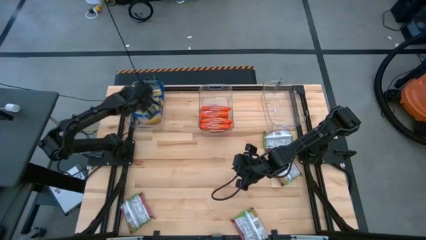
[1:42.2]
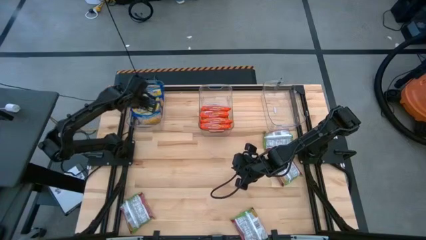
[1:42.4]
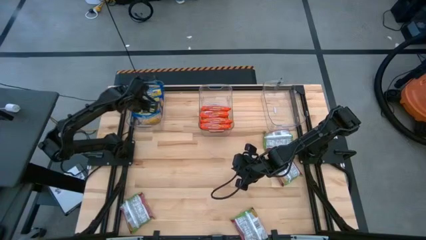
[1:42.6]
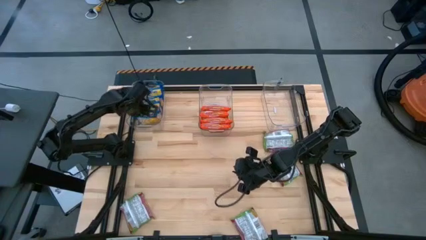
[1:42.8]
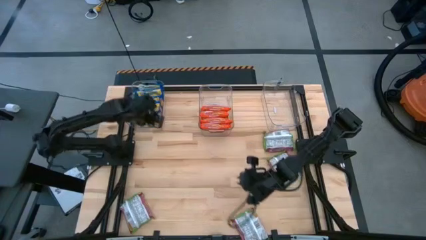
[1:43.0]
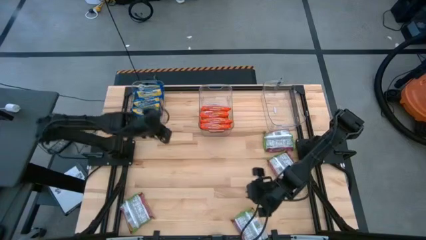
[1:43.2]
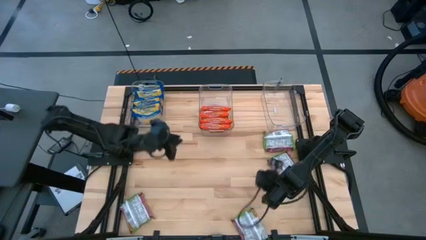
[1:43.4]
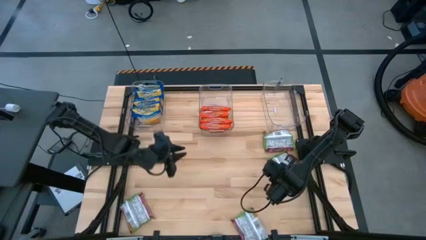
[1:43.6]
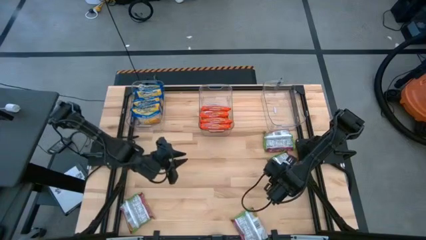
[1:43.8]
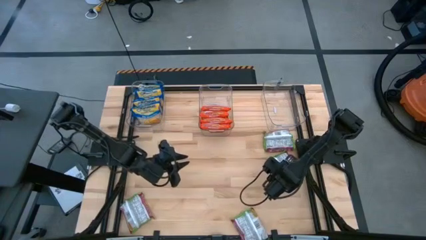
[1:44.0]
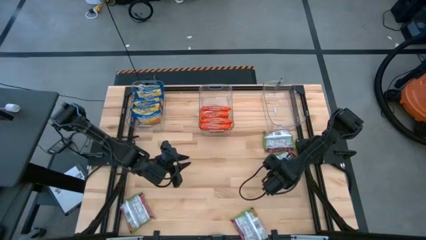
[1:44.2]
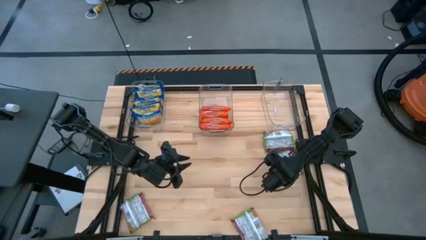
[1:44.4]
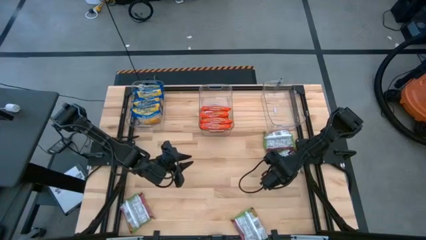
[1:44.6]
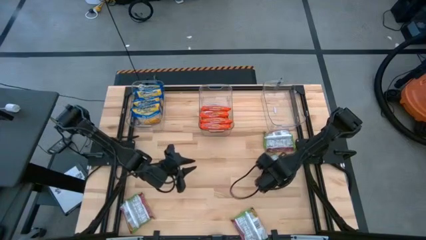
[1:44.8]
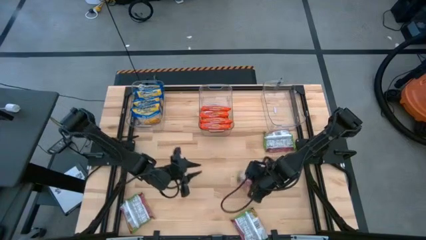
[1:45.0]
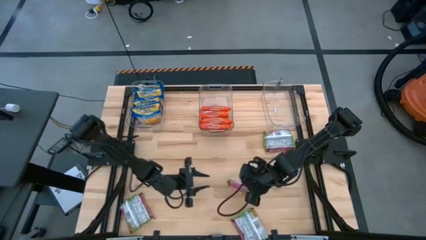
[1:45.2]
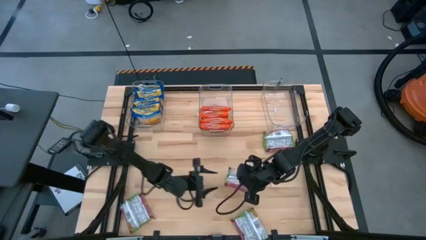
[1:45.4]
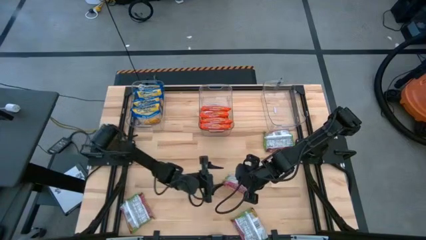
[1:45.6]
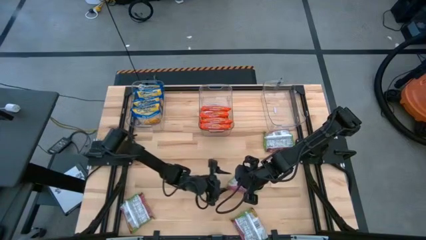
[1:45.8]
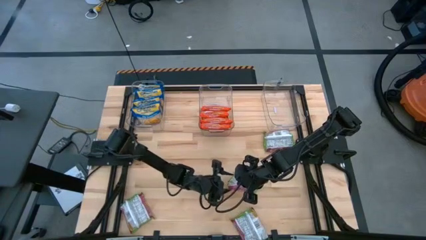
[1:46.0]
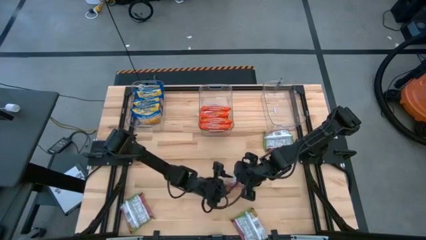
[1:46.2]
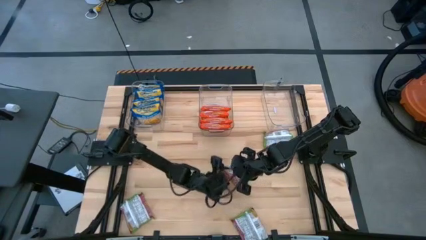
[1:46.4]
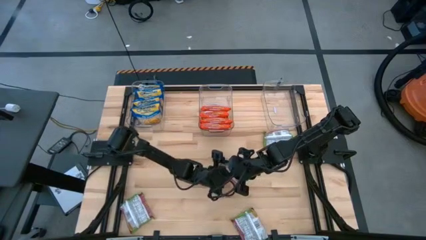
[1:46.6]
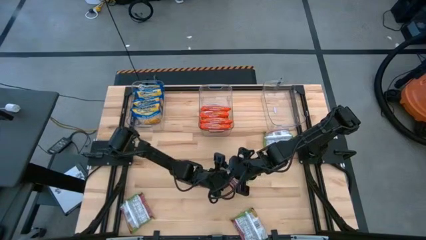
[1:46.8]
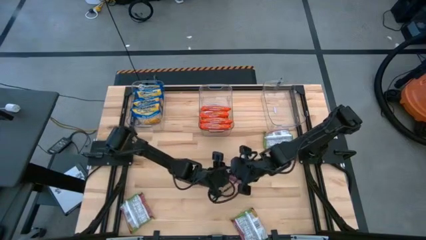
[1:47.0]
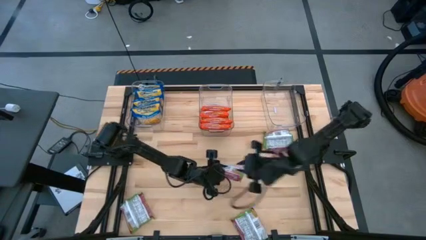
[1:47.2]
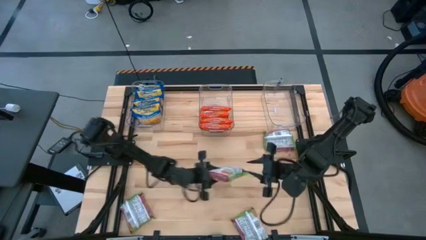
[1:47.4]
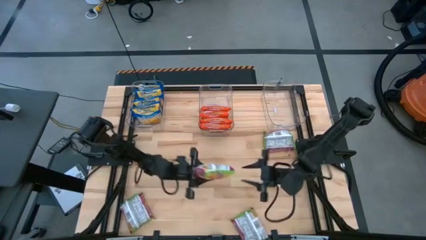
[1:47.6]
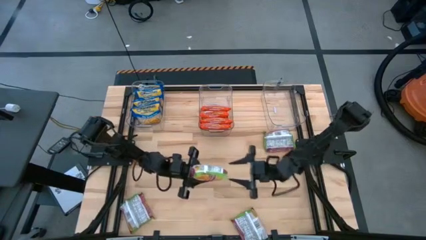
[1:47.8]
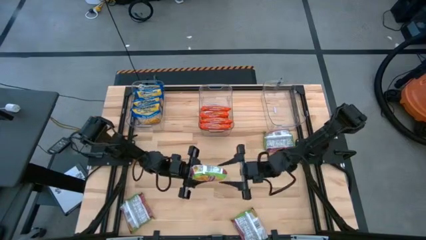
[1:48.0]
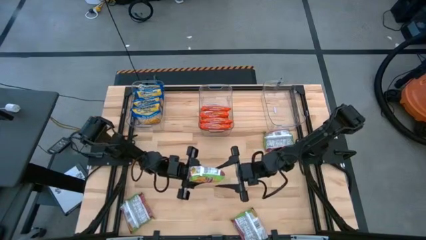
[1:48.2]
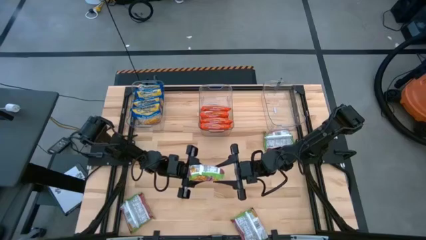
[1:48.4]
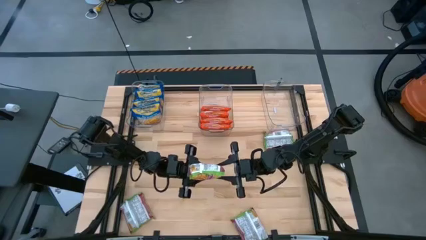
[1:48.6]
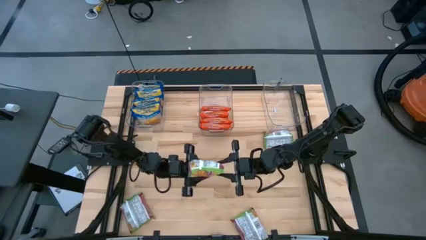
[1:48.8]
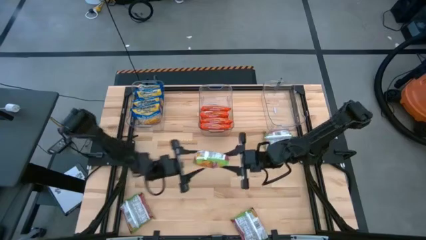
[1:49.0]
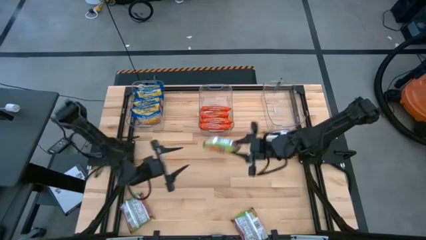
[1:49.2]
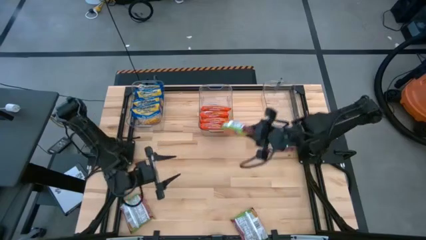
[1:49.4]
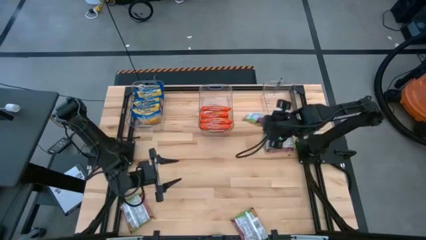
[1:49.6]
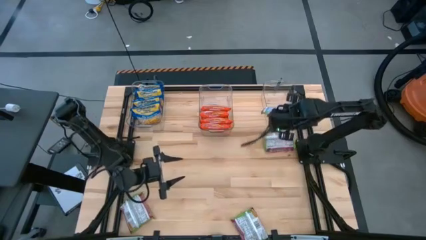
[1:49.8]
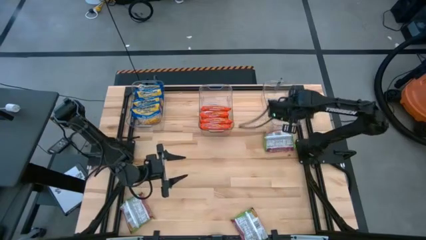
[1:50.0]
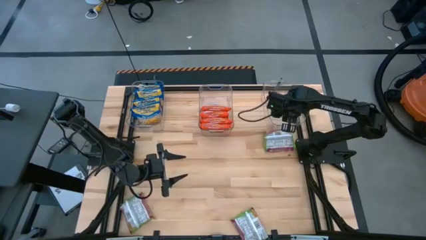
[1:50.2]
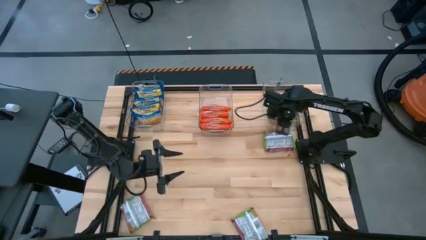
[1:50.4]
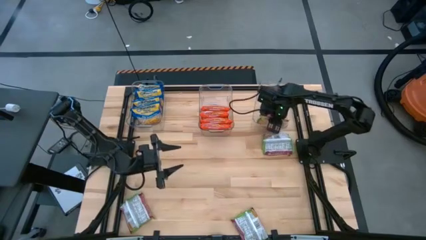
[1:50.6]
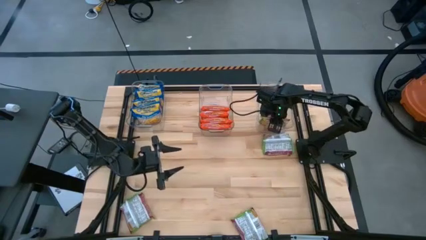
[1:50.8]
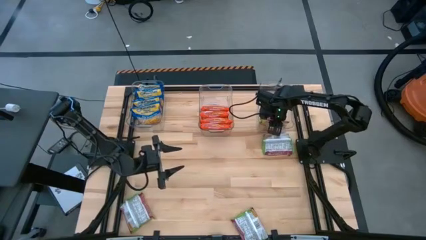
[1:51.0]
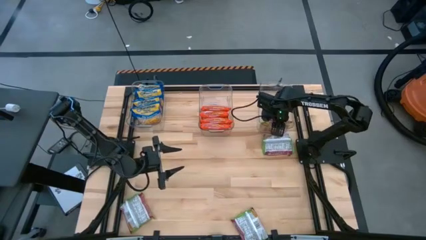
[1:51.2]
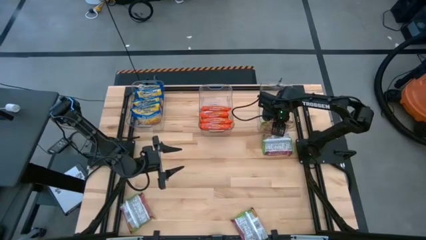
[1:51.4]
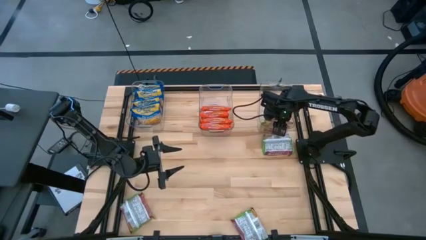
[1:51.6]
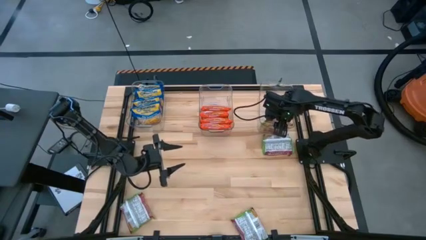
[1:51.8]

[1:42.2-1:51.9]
Task: Sort Maruchan noodles
Put the green noodle pack into the right transparent bin

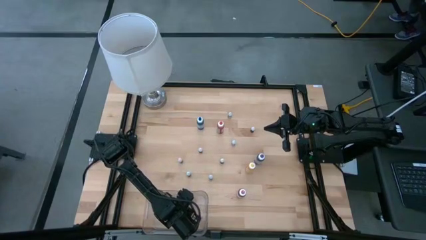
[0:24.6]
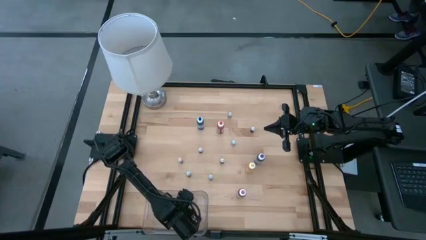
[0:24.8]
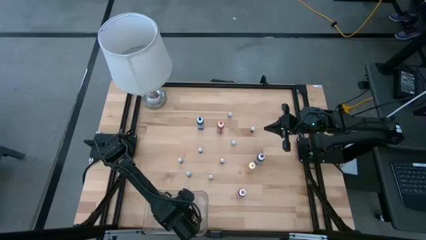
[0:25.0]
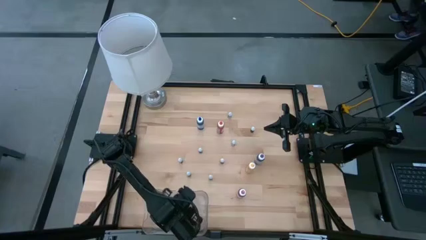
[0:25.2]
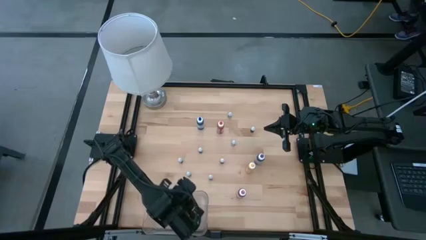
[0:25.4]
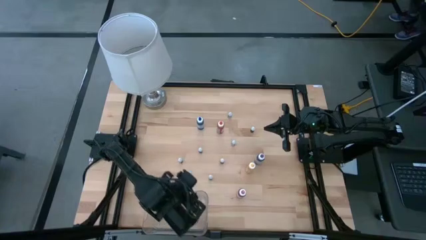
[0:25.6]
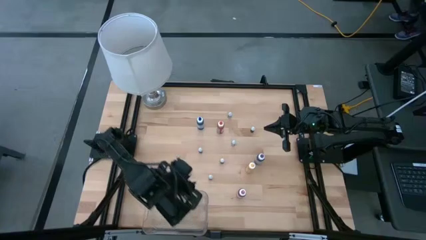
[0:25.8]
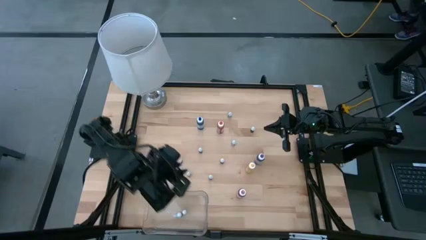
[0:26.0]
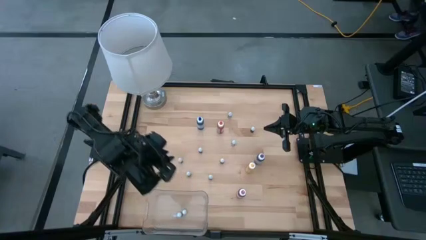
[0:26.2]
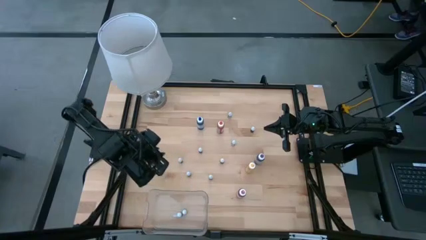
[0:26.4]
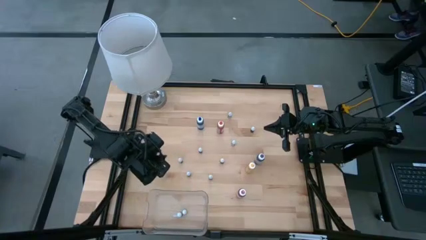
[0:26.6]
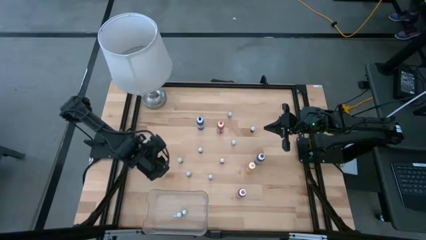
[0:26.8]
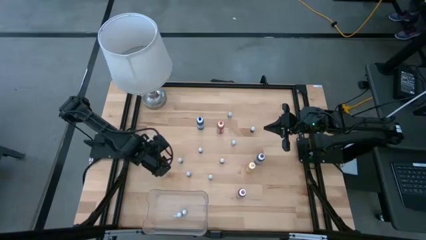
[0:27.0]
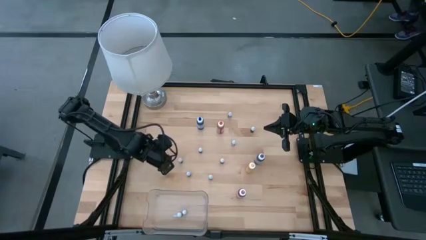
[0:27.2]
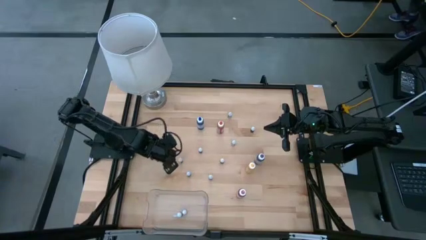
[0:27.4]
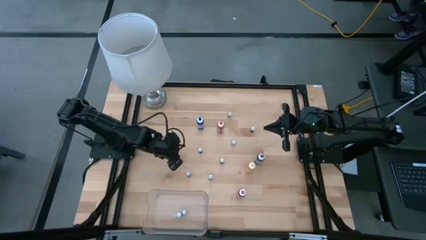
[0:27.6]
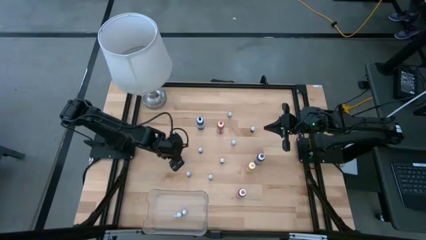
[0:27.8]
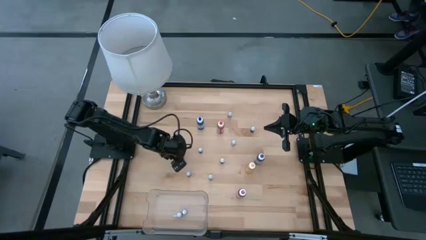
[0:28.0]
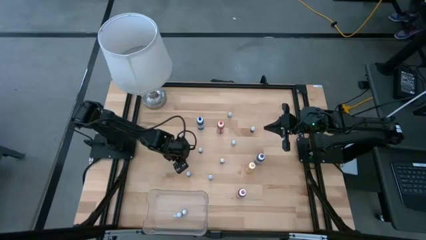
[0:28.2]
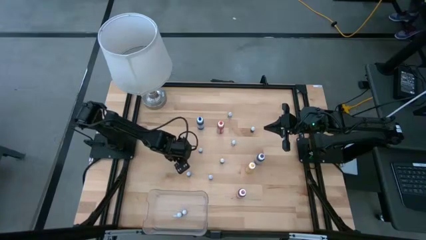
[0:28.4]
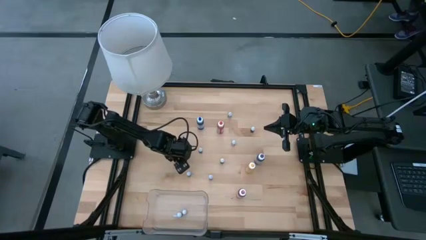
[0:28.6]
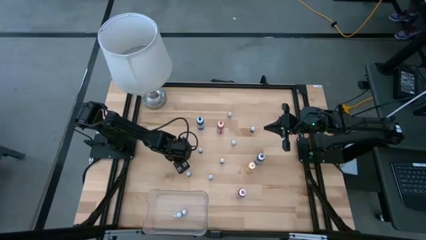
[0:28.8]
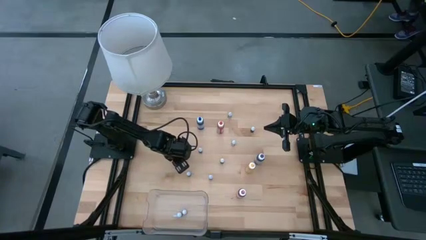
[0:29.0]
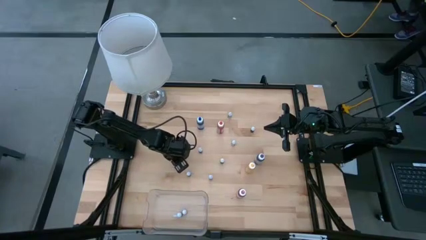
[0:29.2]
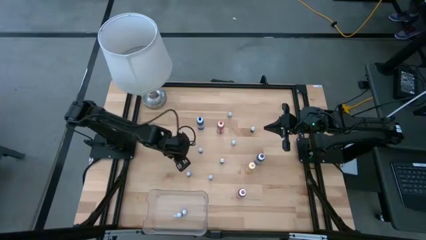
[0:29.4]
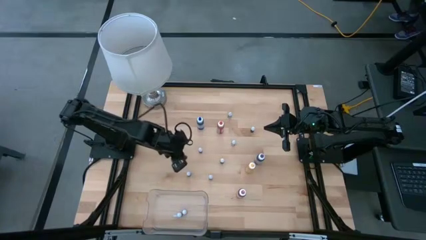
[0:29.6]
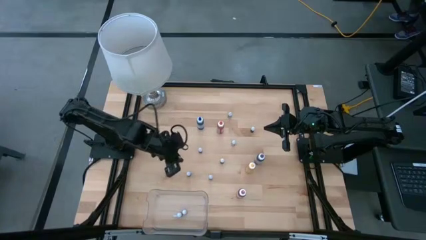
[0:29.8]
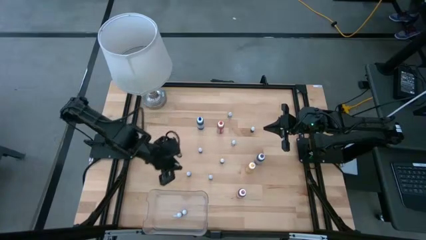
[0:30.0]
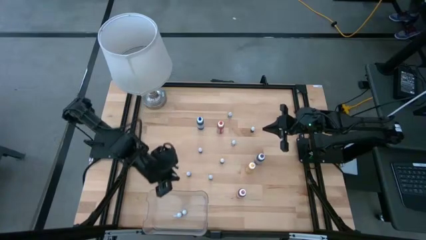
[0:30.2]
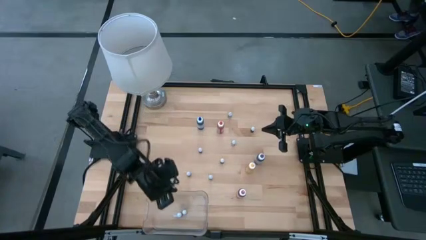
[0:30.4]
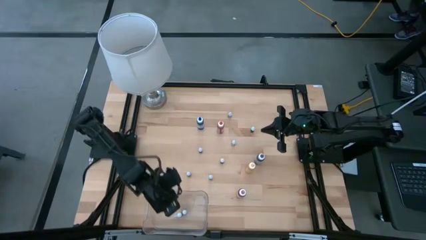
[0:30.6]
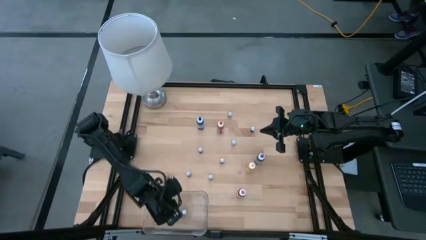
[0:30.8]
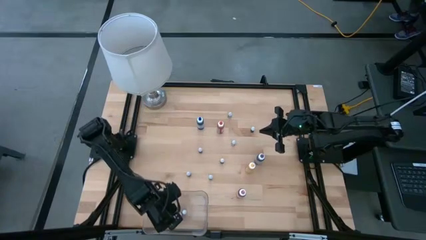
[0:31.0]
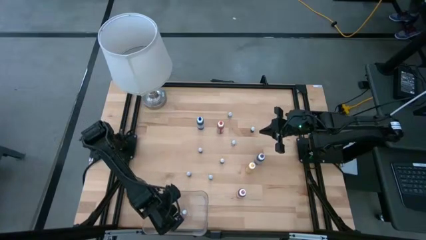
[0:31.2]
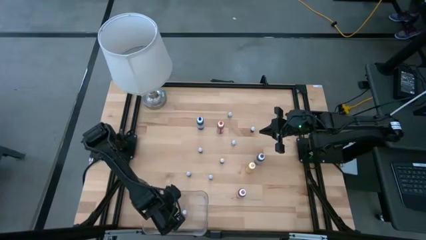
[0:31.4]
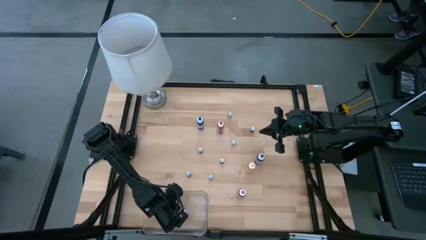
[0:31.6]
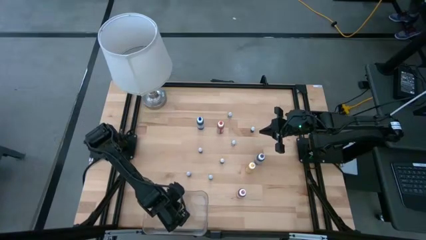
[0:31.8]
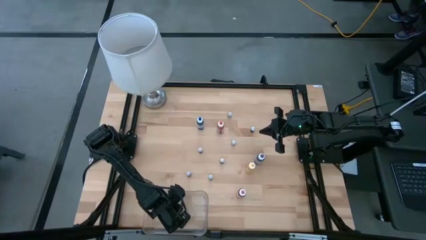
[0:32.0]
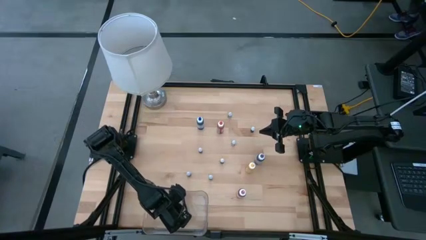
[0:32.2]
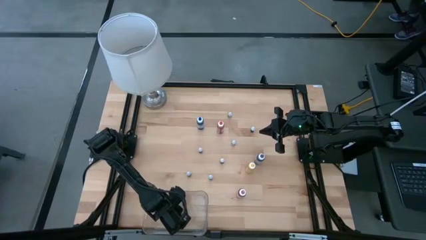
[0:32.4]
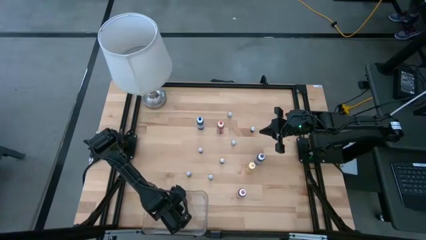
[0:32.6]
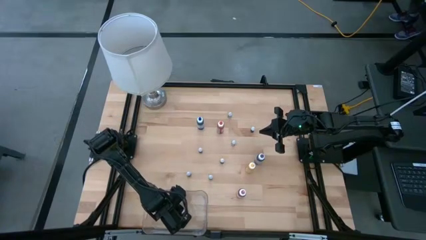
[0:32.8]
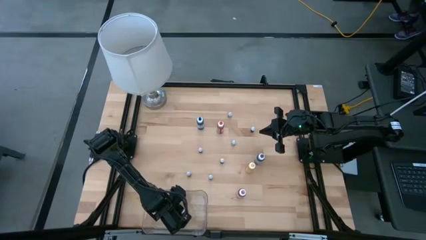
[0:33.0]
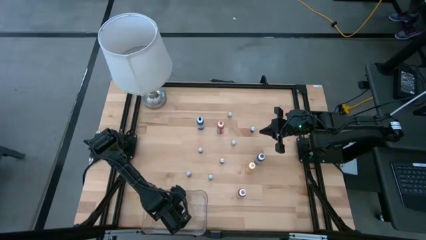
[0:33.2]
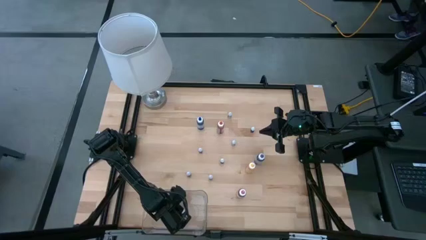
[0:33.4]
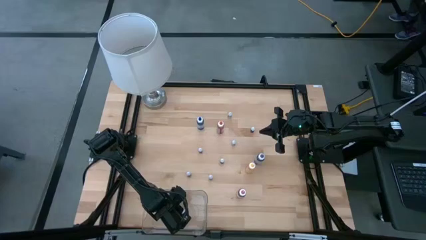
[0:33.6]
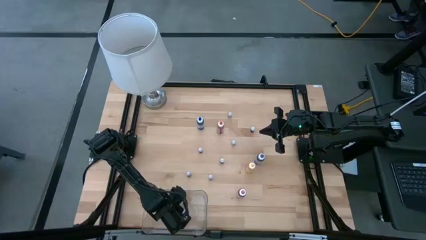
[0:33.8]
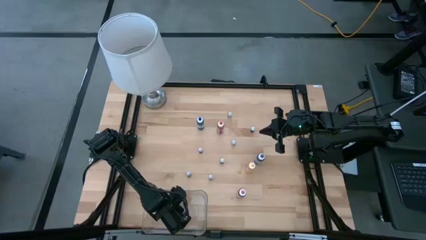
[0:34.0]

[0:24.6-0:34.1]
Task: Pick & Place food coloring
Put the left red food coloring bottle into the bin
